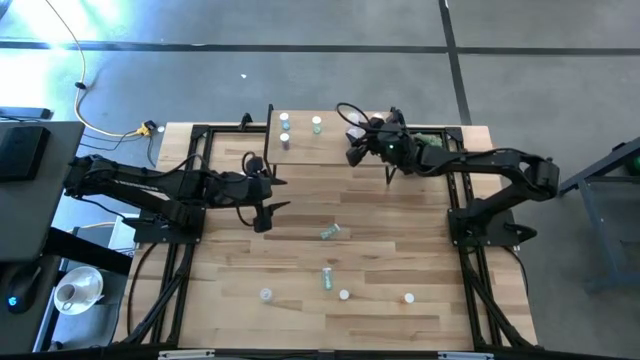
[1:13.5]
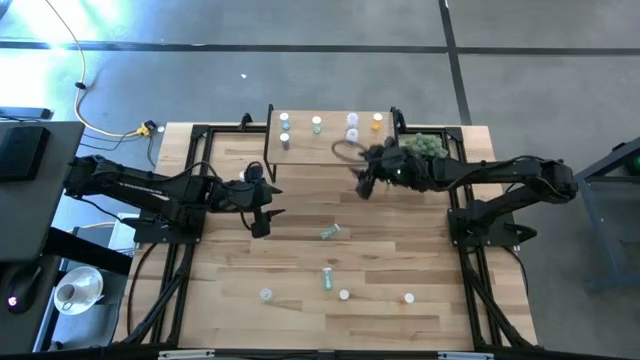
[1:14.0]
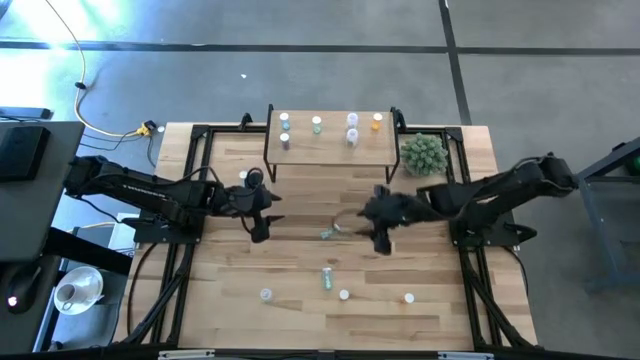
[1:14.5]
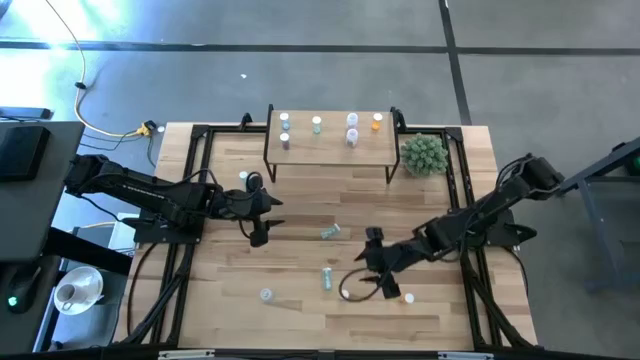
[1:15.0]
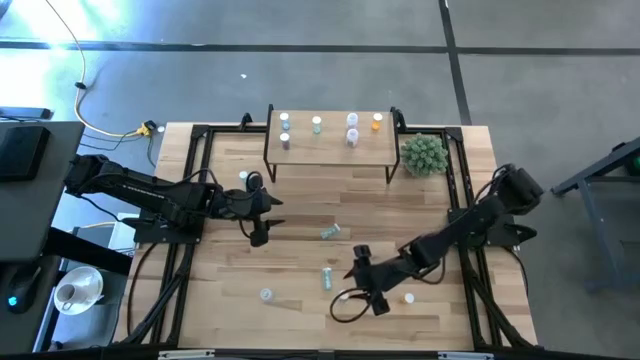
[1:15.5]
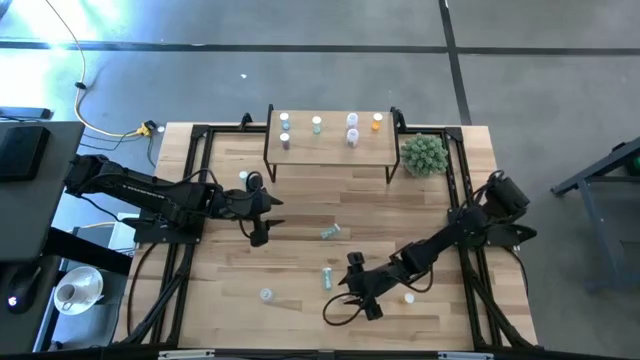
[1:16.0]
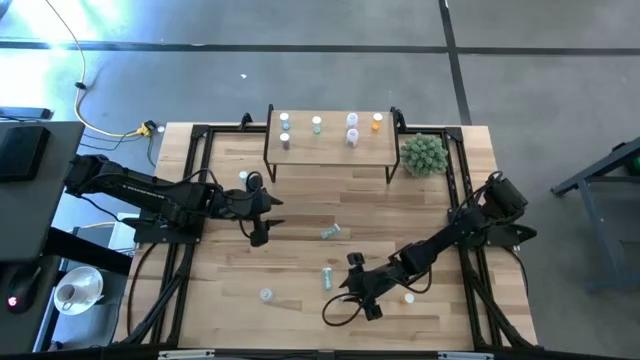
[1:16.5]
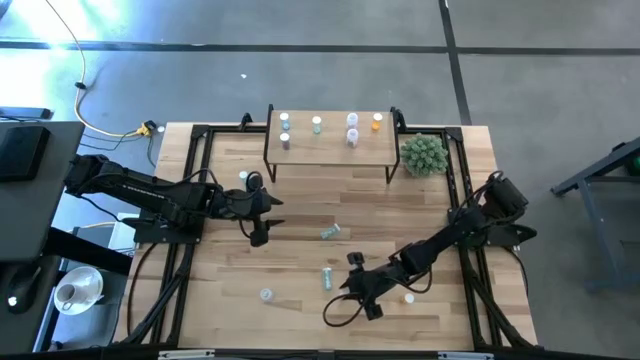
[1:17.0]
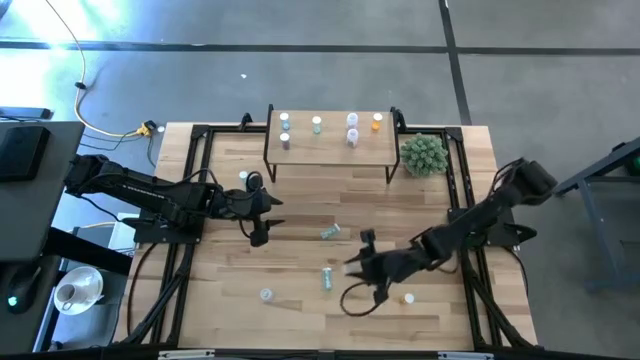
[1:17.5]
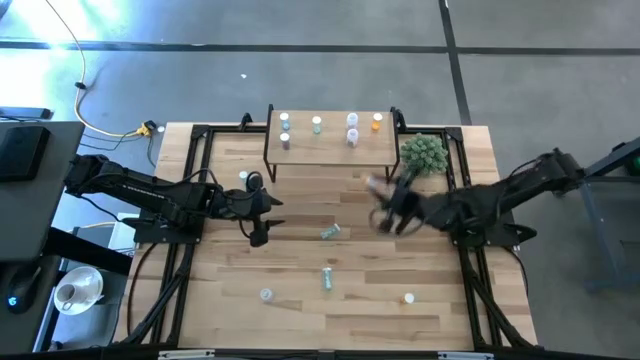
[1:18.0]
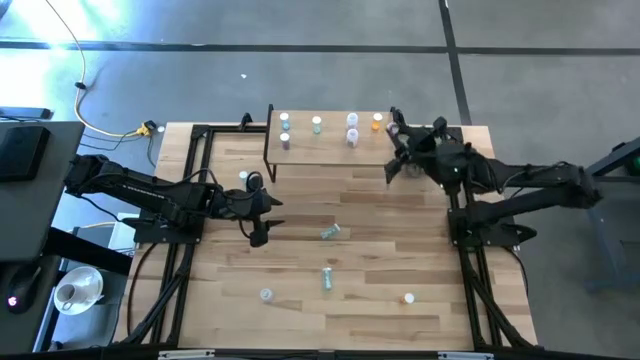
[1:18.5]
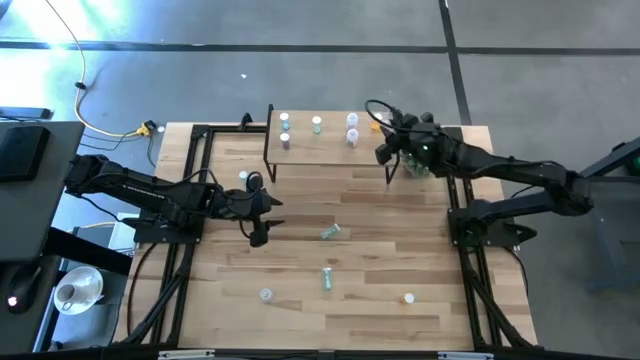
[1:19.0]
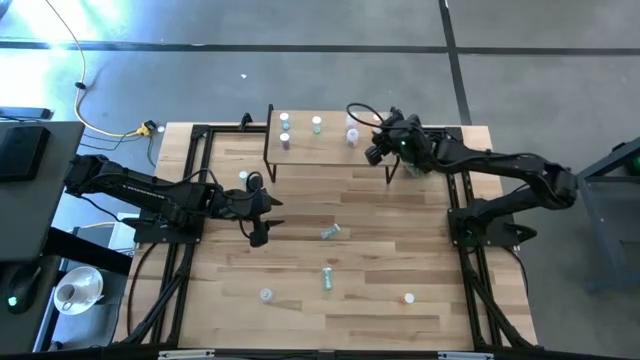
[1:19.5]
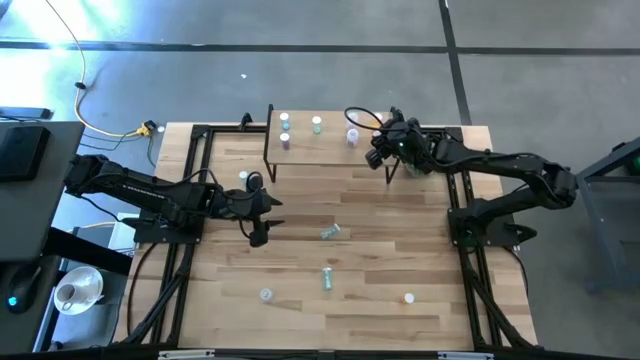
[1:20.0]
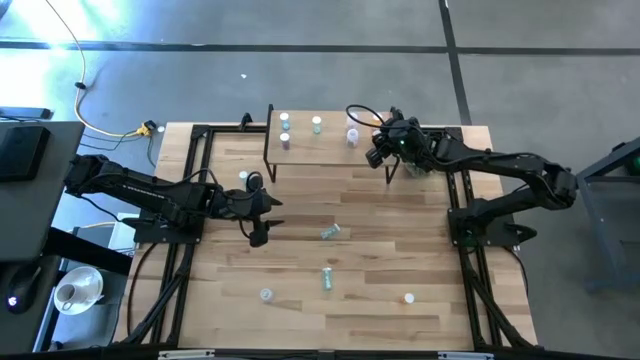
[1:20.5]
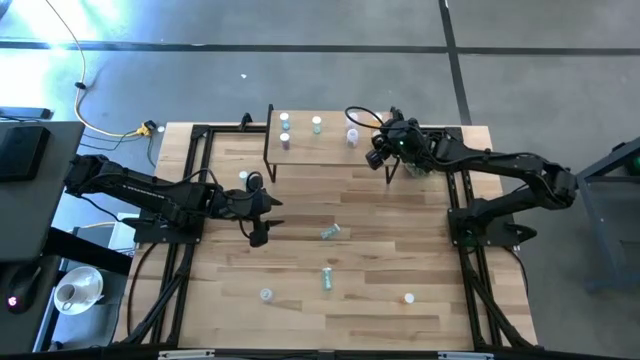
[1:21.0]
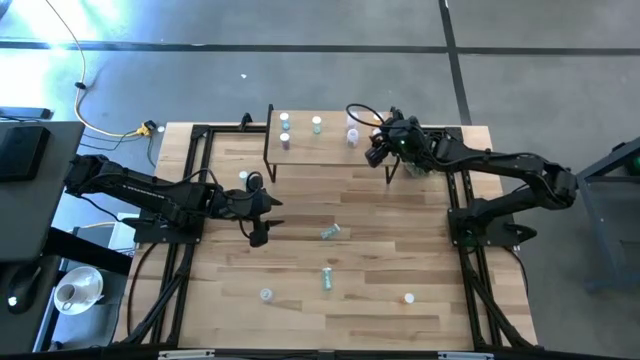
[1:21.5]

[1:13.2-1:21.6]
Task: Pick and place medicine bottles onto shelf by color
Put the left orange pill bottle on the shelf aligned with the other orange pill bottle

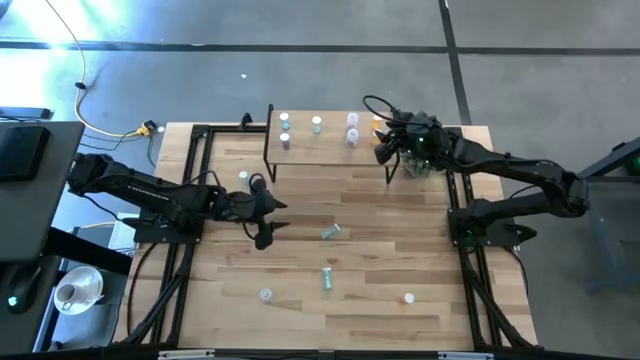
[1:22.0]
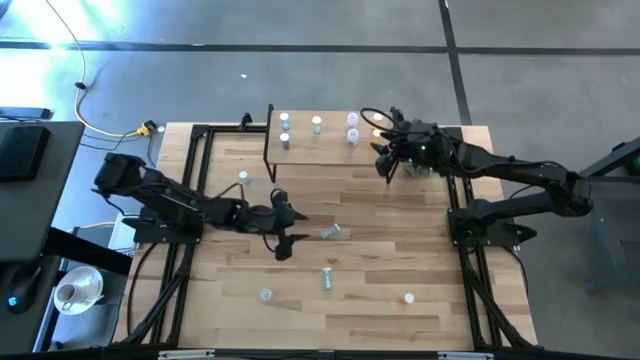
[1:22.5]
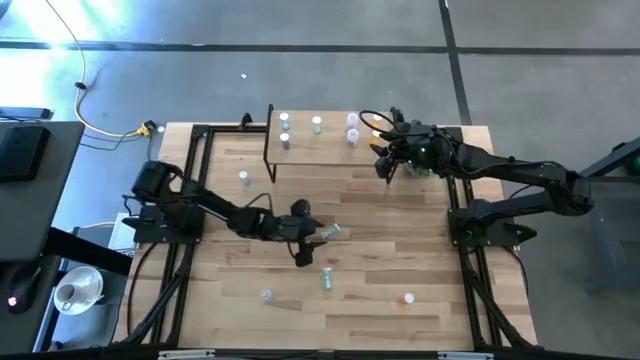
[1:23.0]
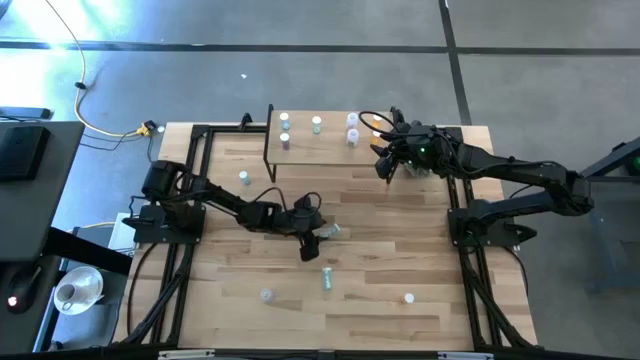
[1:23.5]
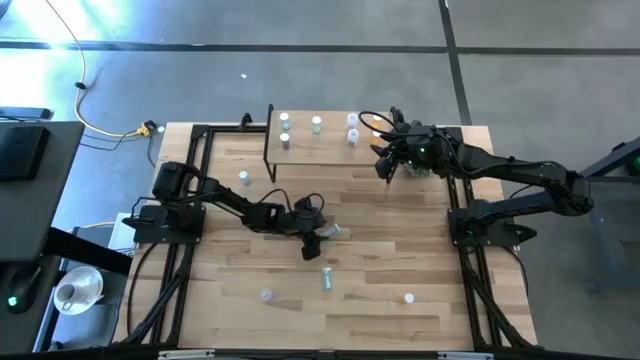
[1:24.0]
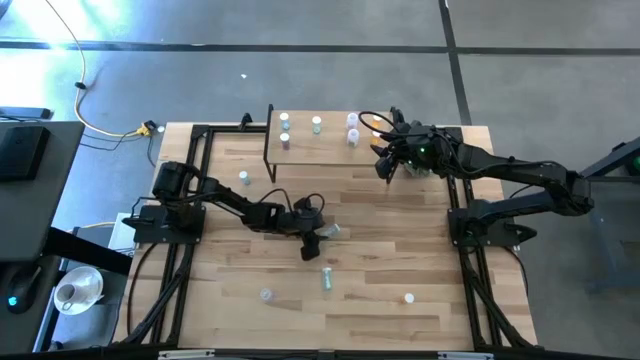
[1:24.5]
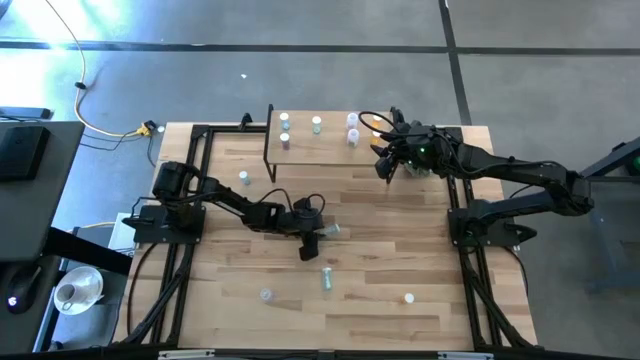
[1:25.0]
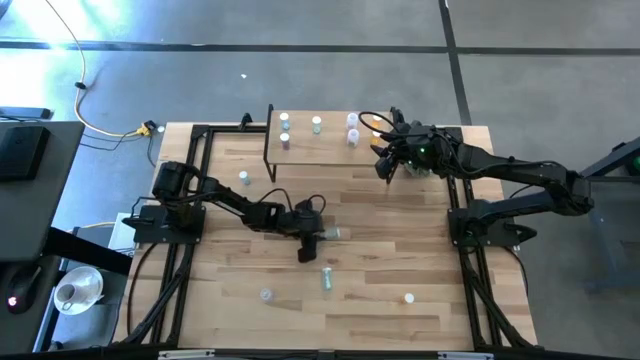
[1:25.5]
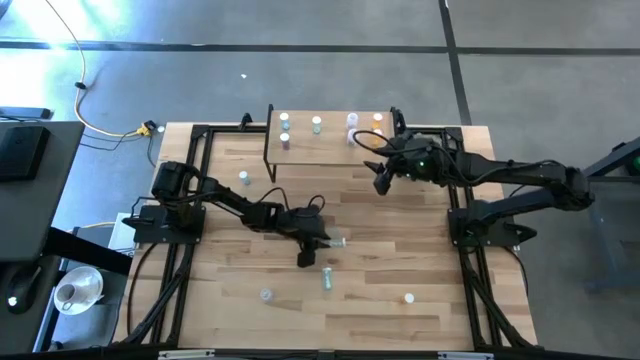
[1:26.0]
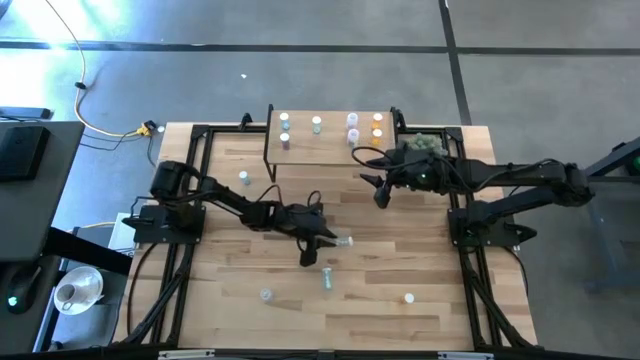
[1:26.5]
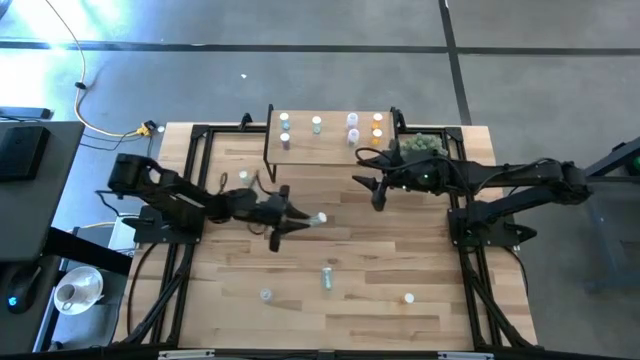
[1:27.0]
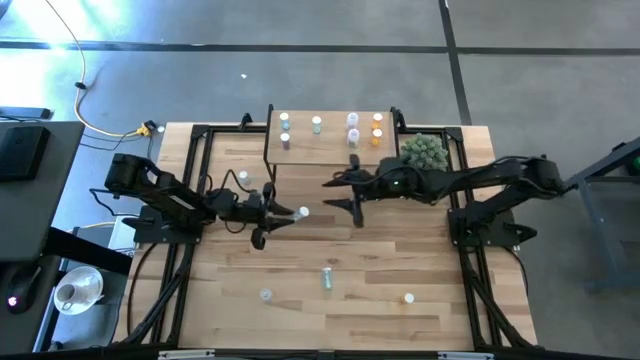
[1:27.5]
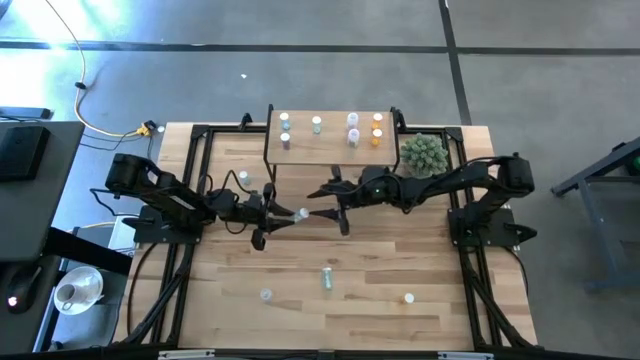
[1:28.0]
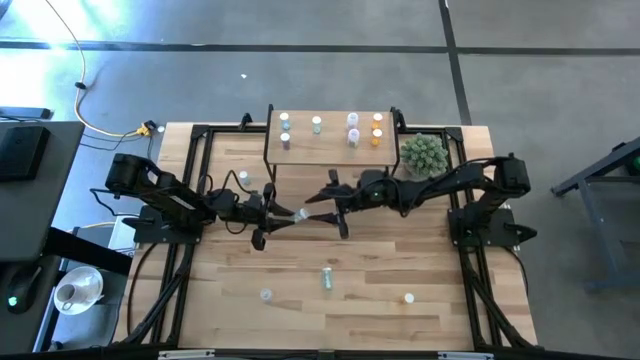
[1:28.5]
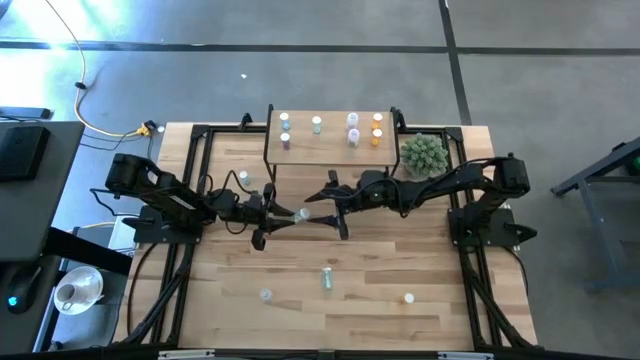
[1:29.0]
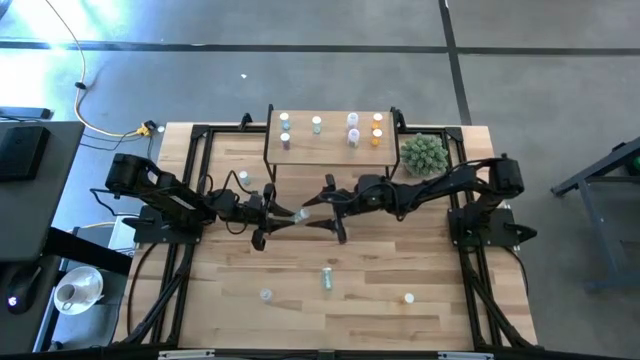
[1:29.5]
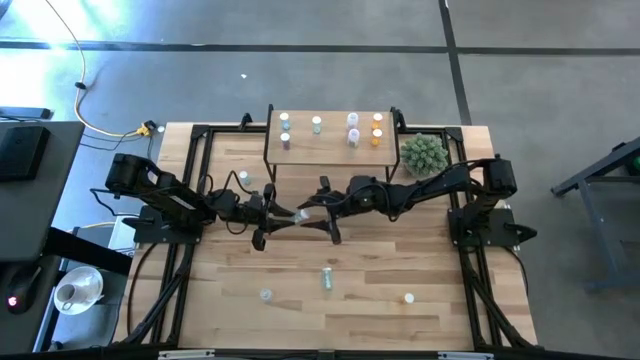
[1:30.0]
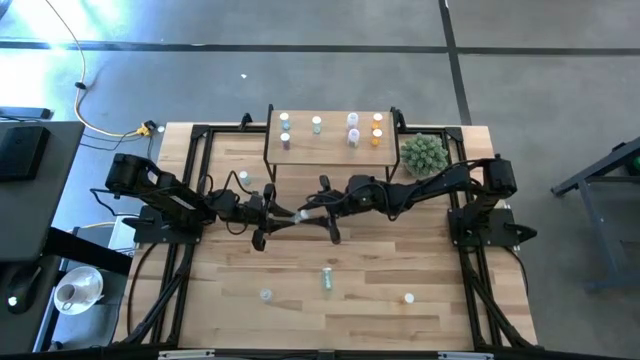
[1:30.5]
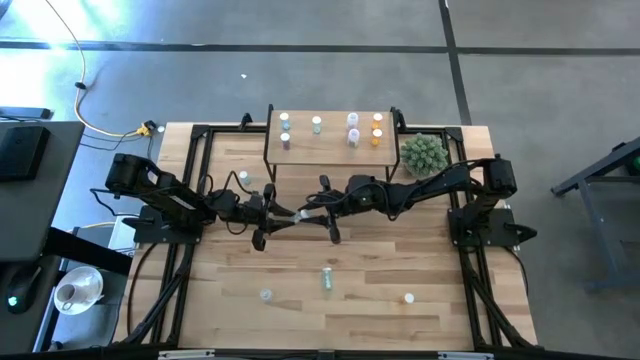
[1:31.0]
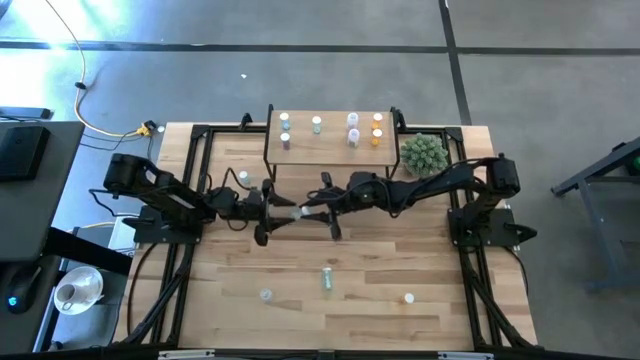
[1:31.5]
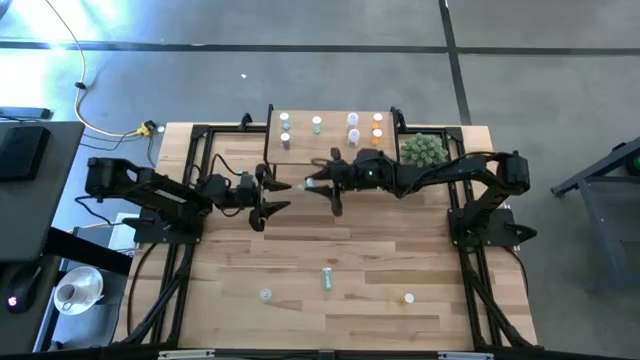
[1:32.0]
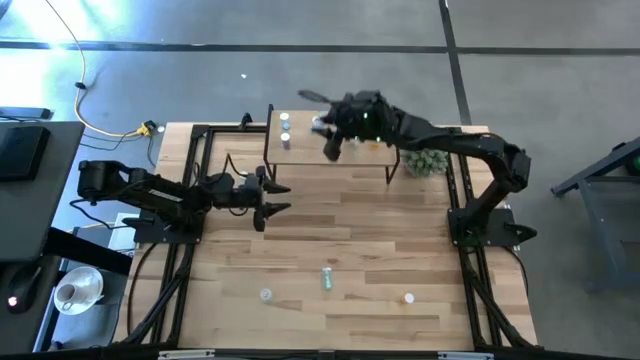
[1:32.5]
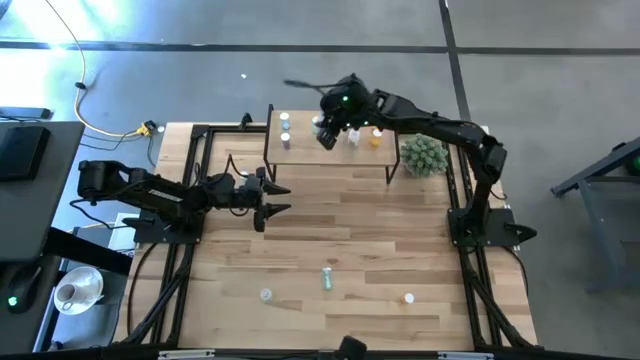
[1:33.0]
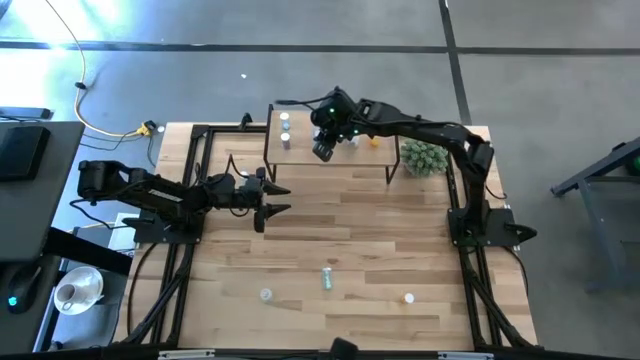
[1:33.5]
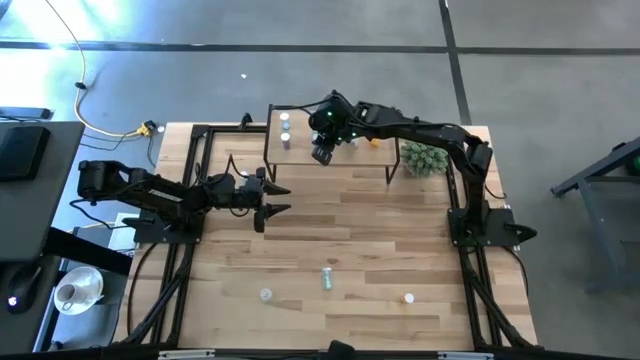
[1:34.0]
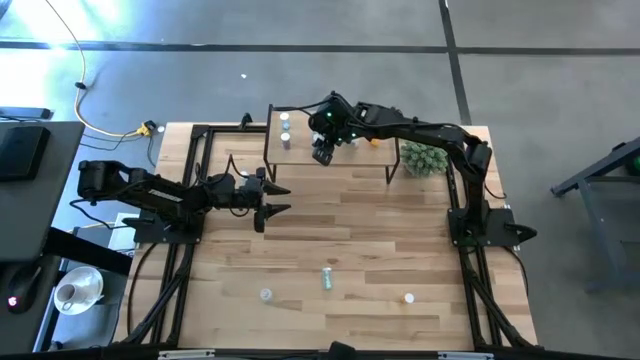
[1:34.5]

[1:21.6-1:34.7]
Put the top green pill bottle on the shelf aligned with the other green pill bottle
